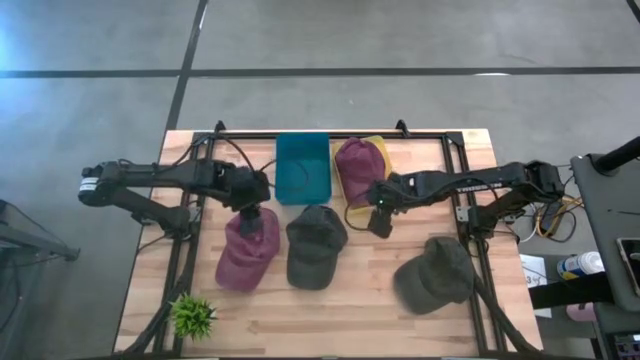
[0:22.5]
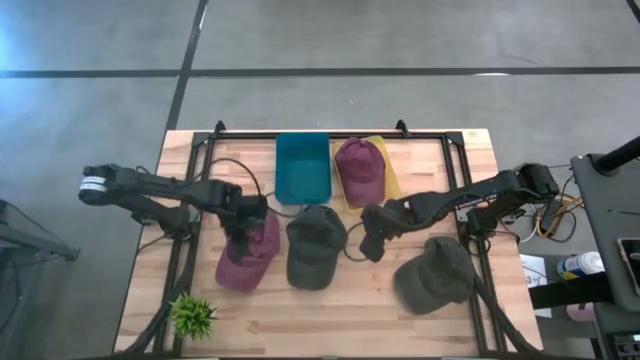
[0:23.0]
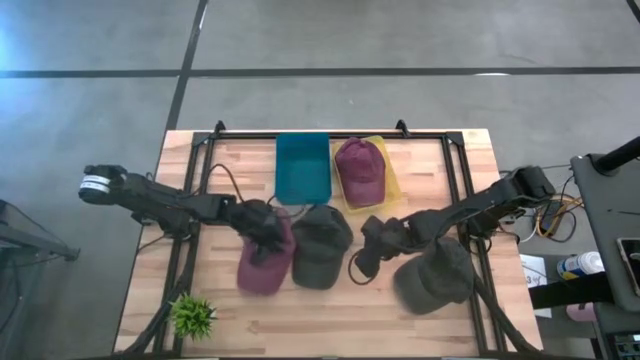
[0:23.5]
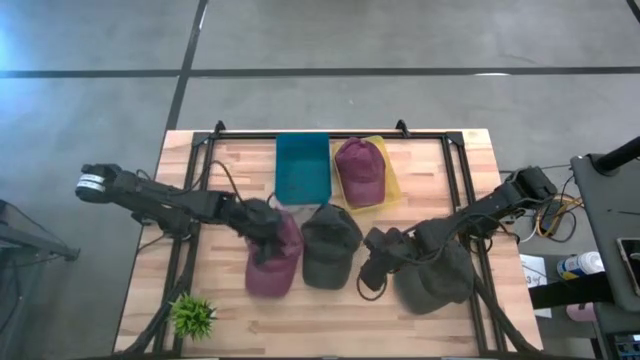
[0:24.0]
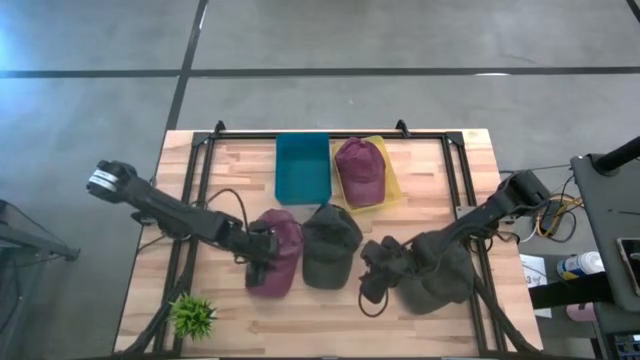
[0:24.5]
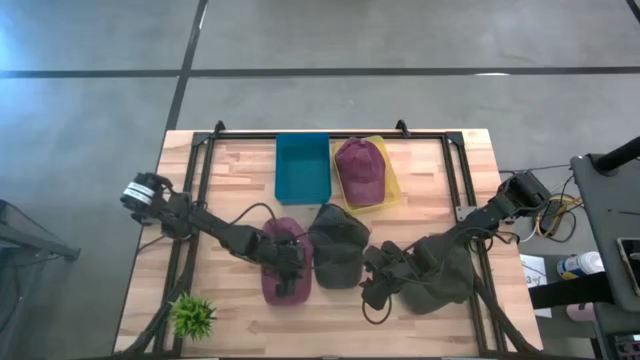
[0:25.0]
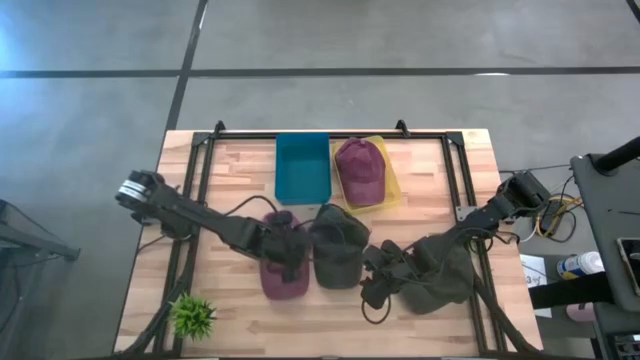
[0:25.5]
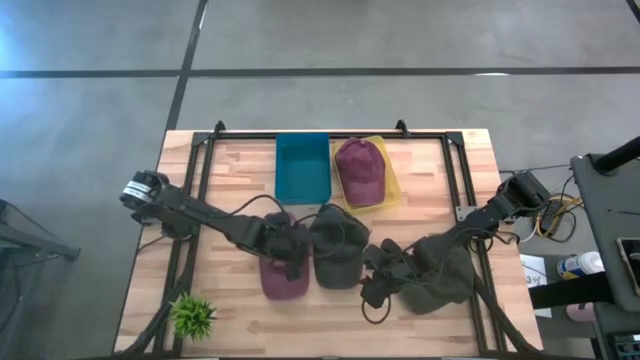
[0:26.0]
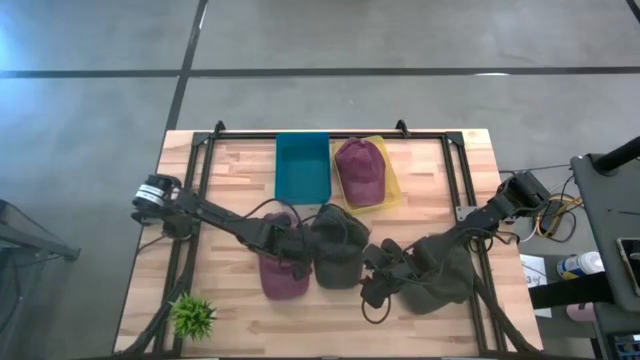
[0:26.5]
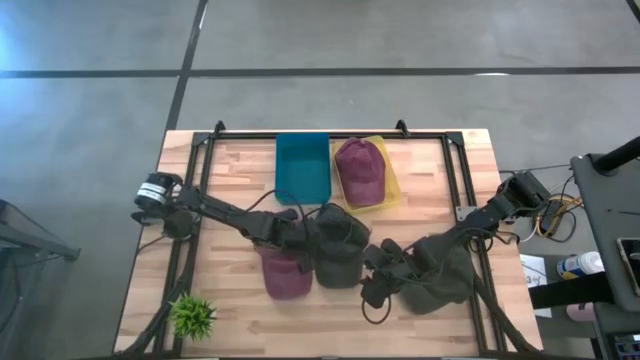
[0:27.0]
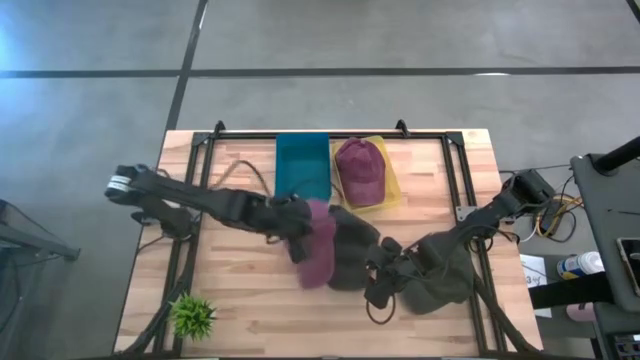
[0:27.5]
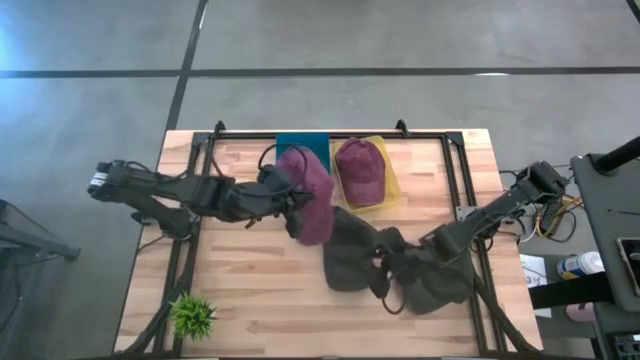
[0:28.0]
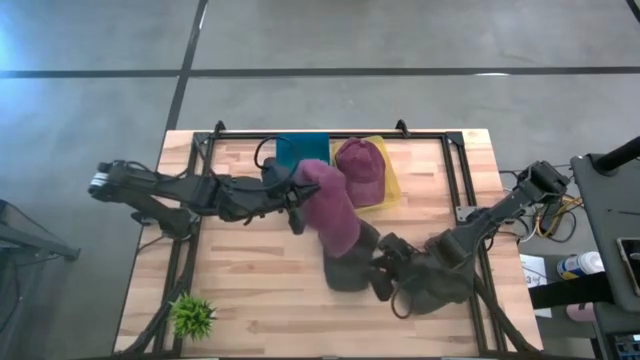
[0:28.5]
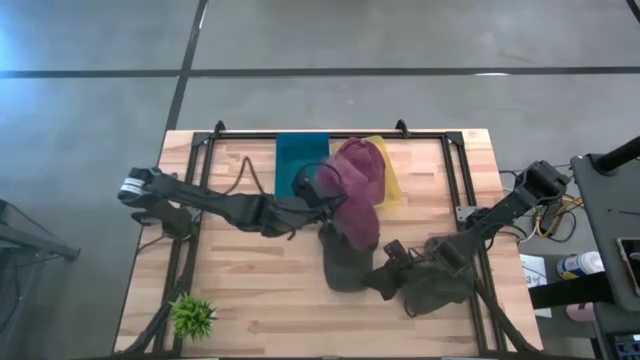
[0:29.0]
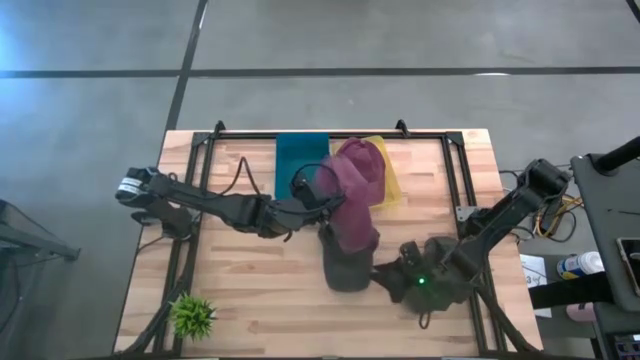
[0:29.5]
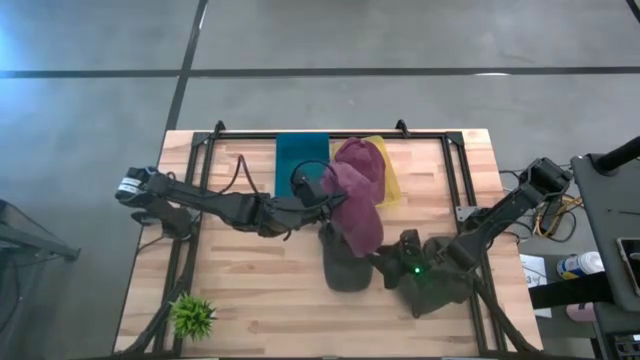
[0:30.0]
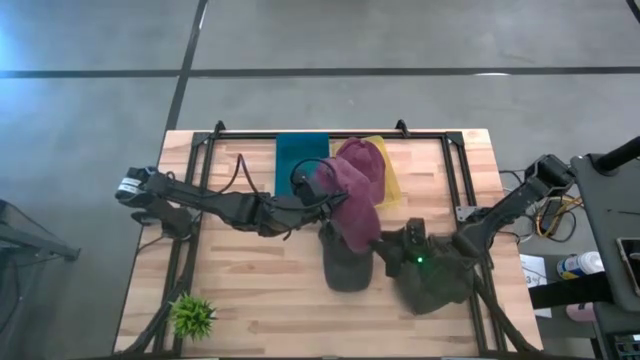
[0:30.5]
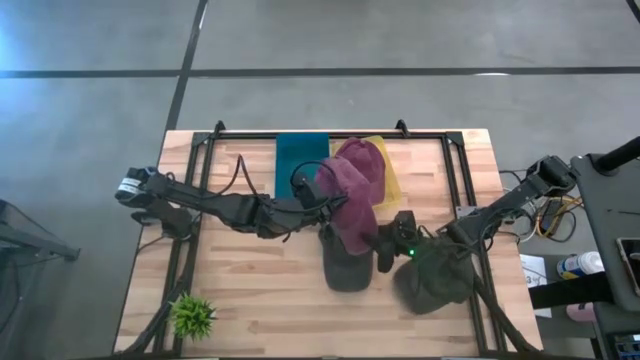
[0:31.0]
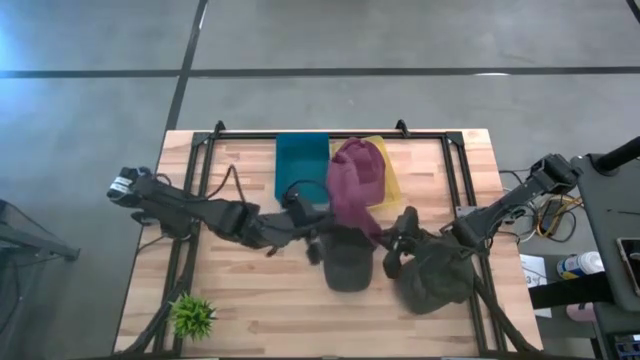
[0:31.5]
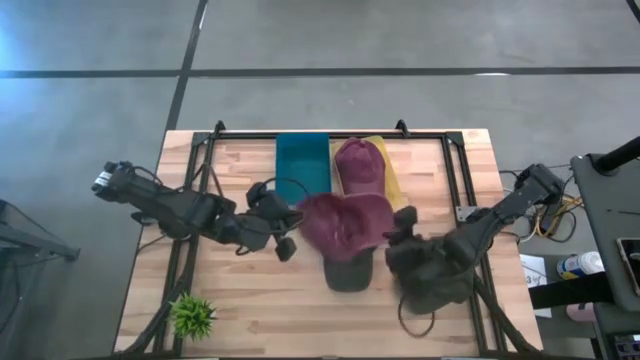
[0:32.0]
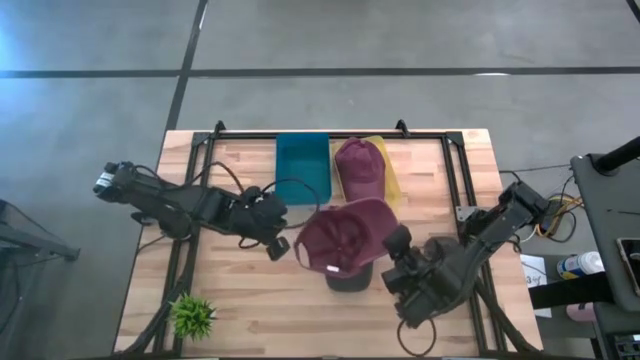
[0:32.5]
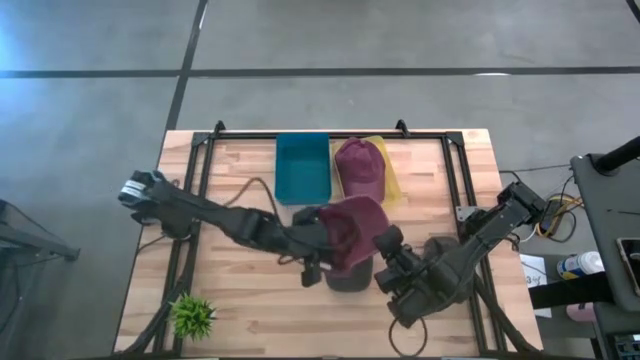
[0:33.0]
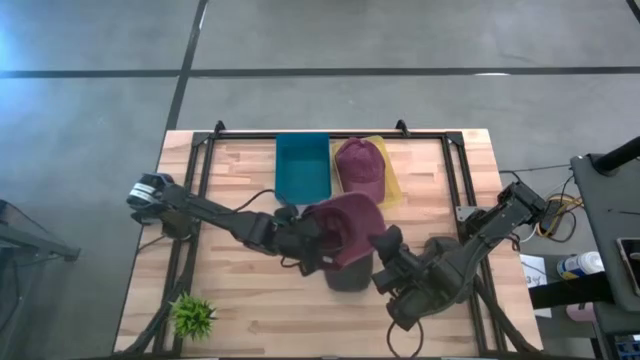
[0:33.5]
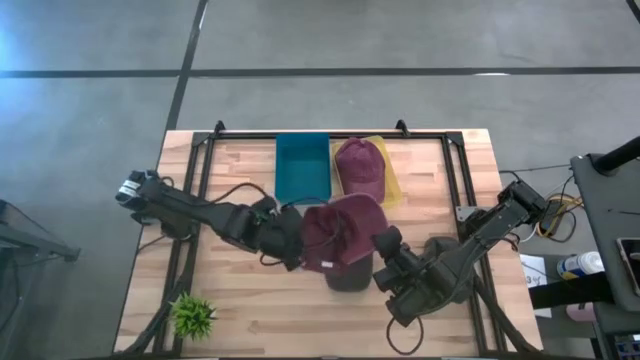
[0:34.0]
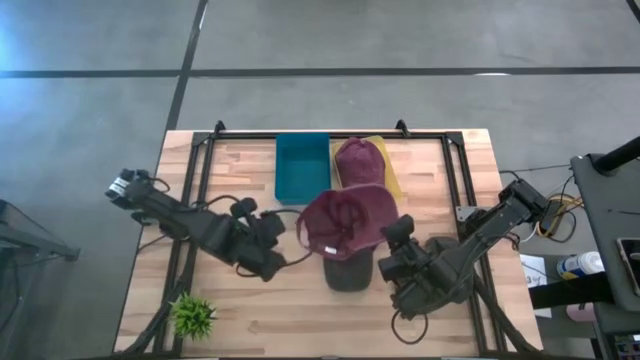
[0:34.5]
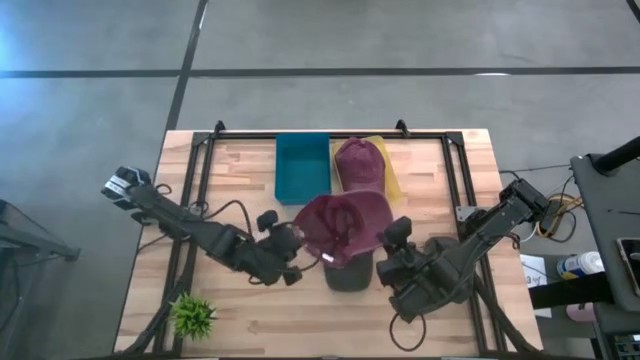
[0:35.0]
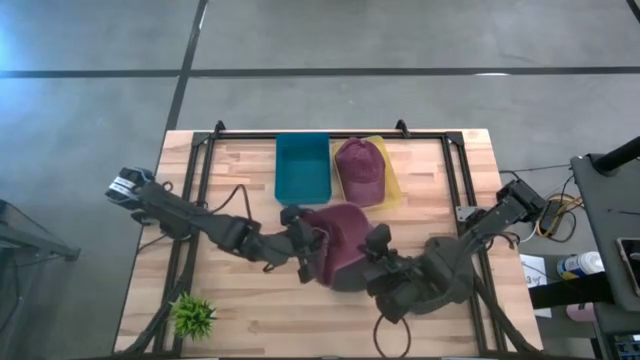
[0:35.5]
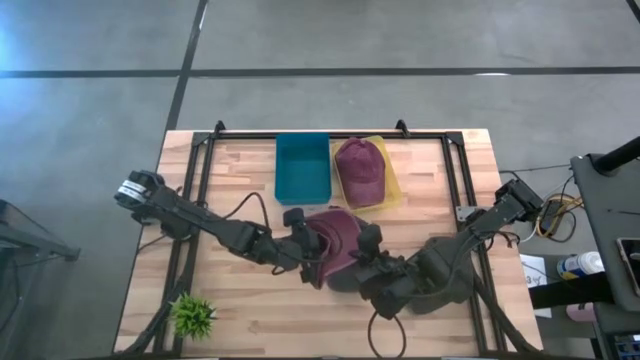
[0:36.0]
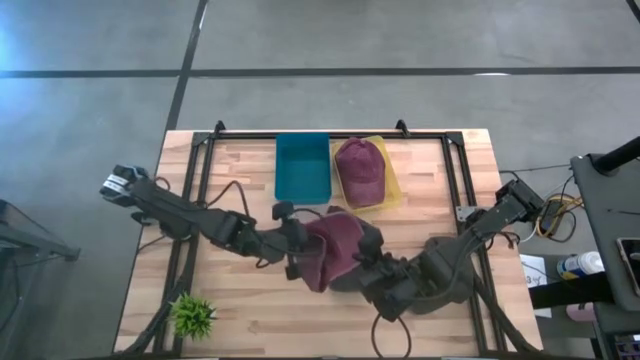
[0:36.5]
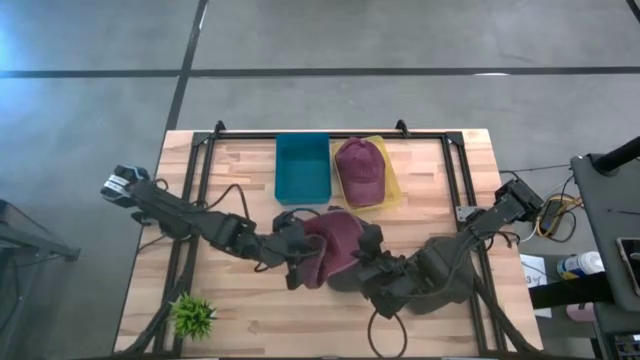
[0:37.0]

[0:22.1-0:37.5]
Task: Pick & Place hat
Put the red cap into the yellow bin
